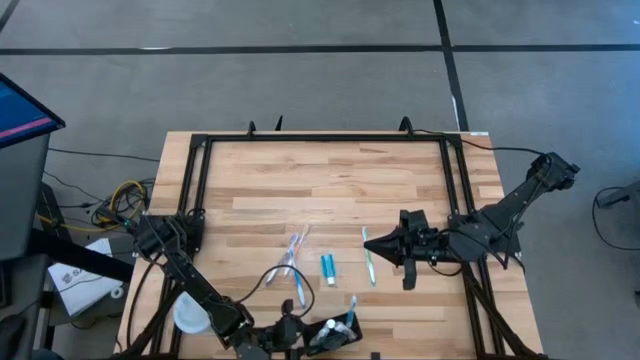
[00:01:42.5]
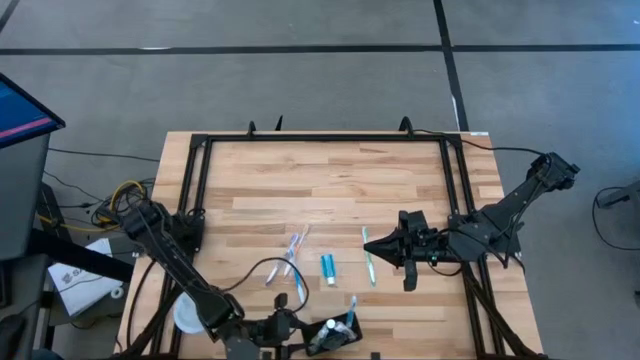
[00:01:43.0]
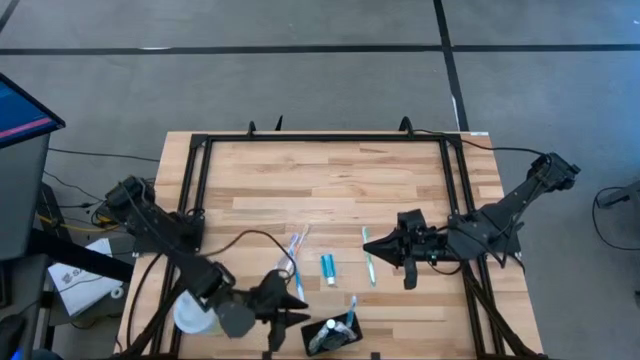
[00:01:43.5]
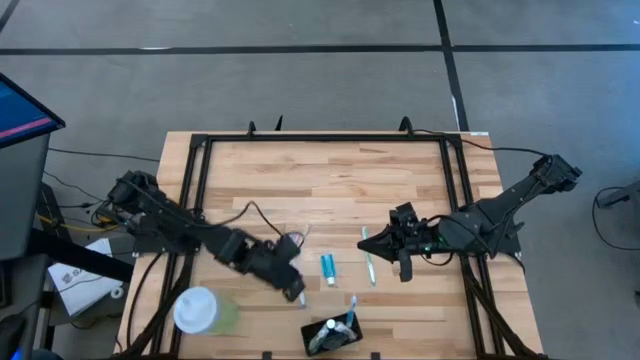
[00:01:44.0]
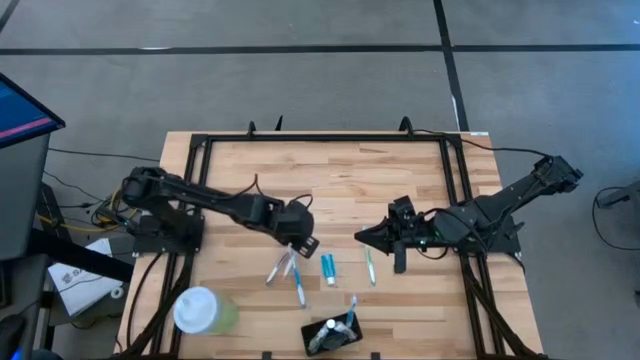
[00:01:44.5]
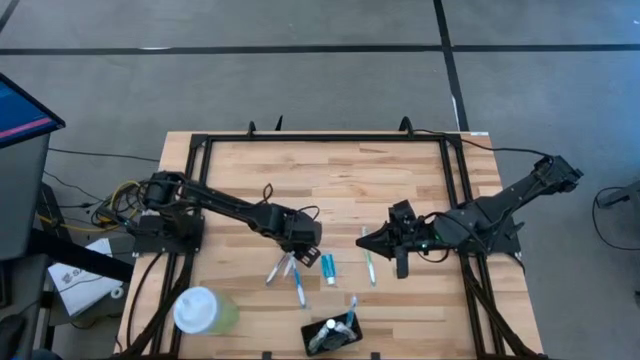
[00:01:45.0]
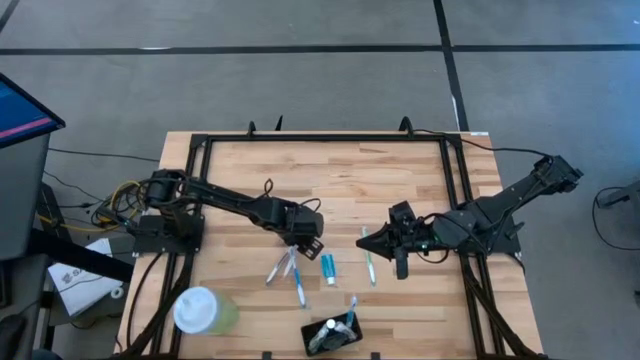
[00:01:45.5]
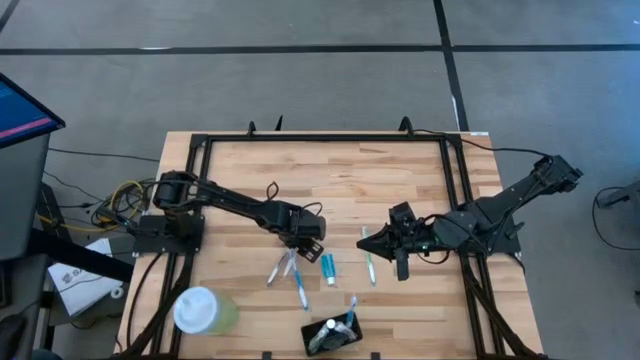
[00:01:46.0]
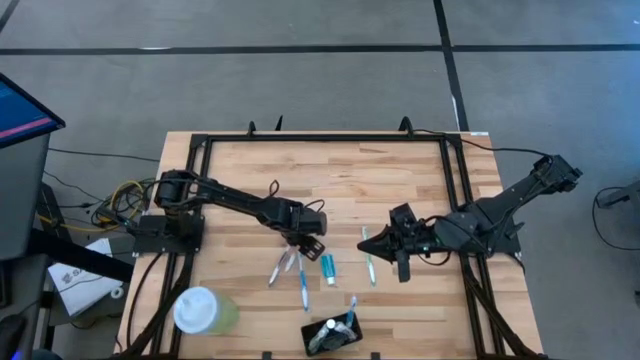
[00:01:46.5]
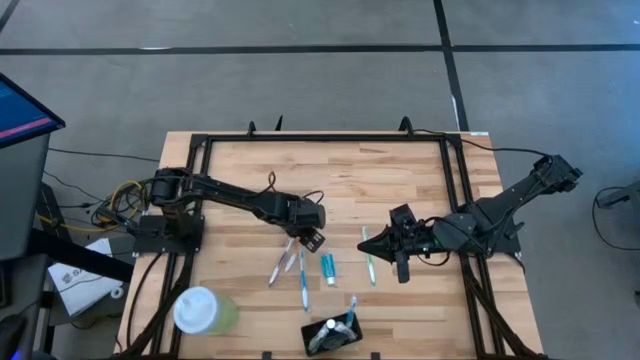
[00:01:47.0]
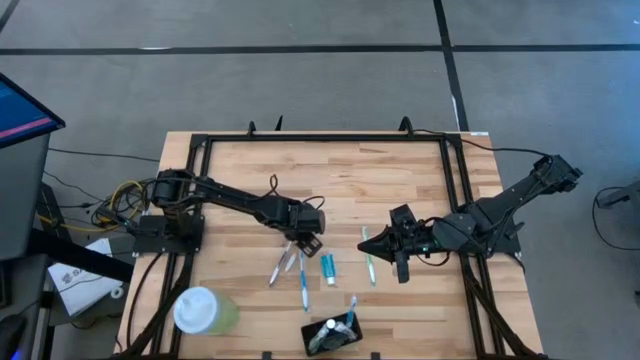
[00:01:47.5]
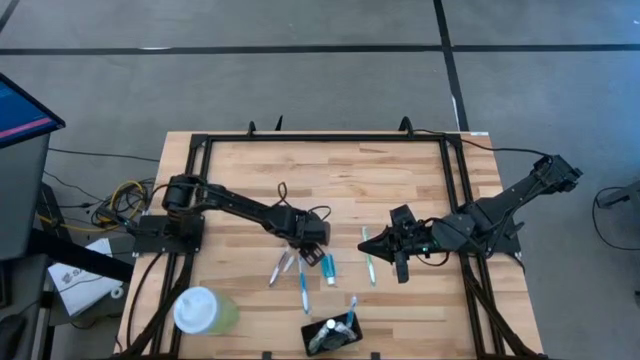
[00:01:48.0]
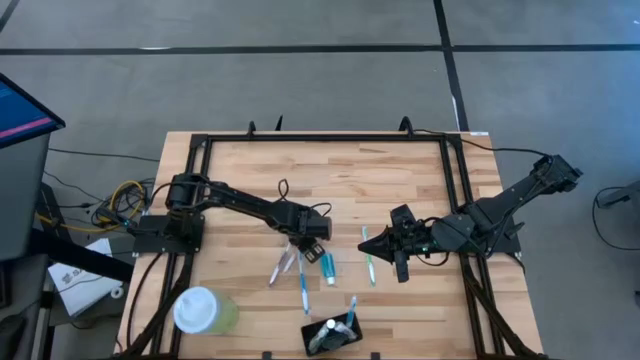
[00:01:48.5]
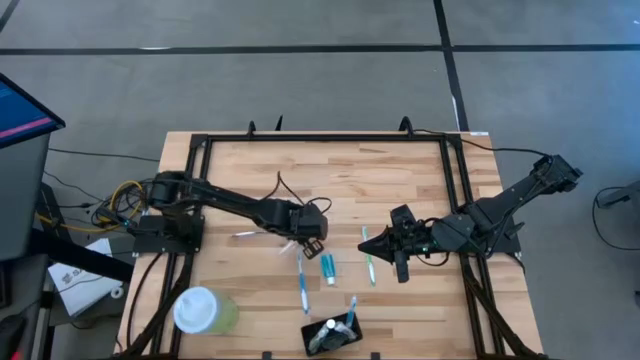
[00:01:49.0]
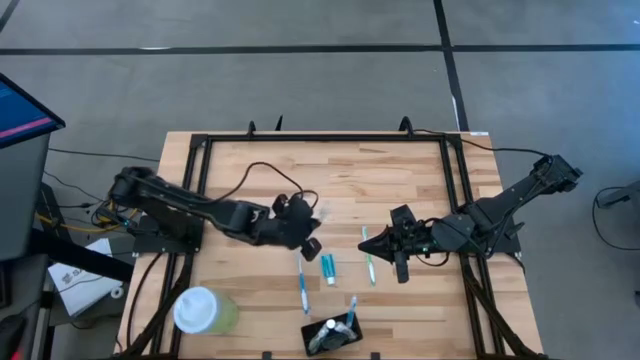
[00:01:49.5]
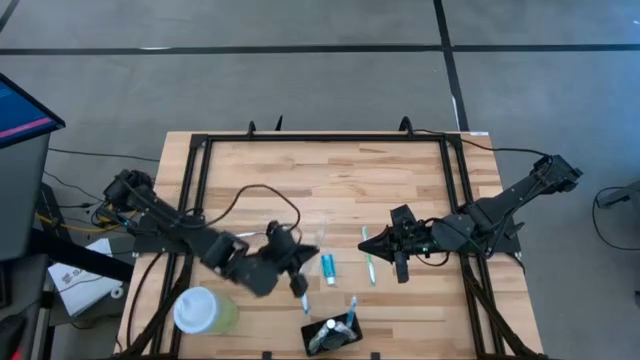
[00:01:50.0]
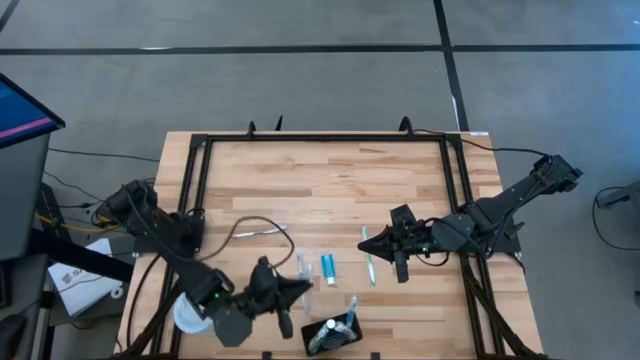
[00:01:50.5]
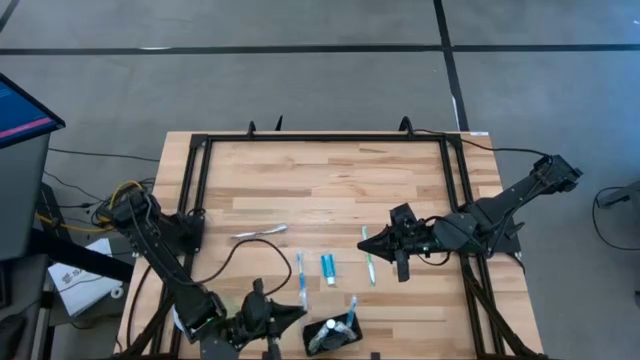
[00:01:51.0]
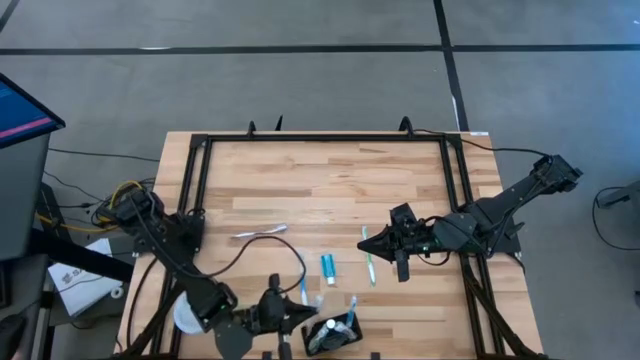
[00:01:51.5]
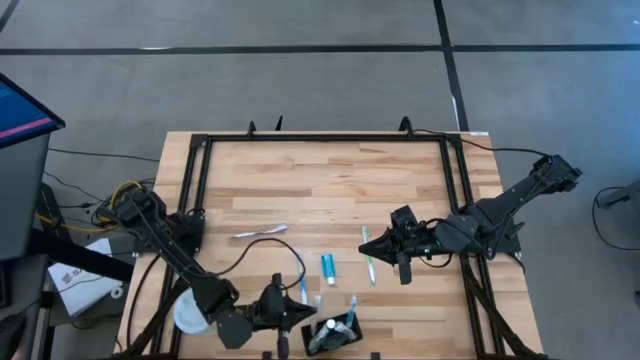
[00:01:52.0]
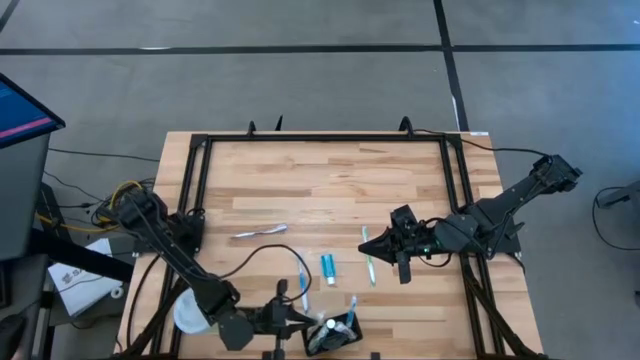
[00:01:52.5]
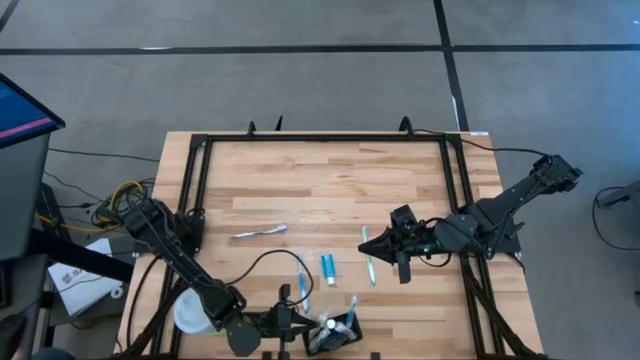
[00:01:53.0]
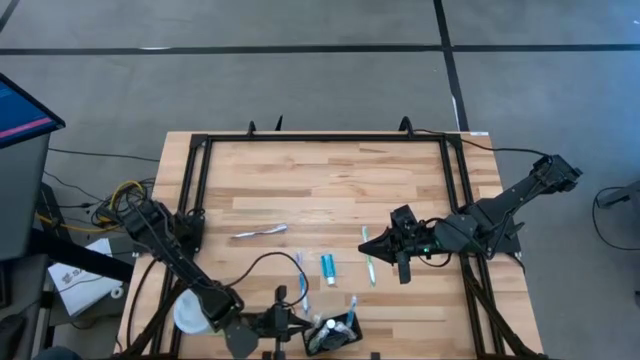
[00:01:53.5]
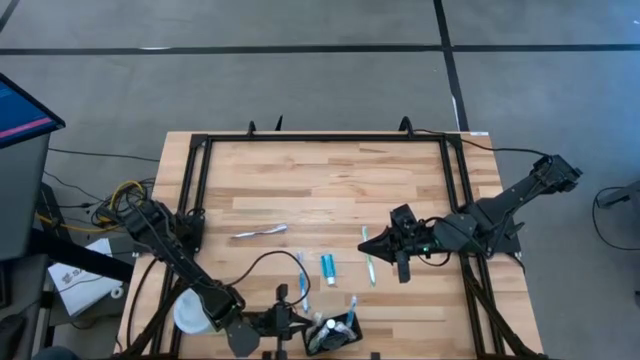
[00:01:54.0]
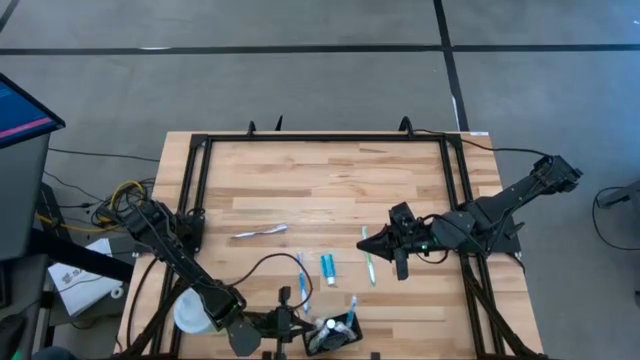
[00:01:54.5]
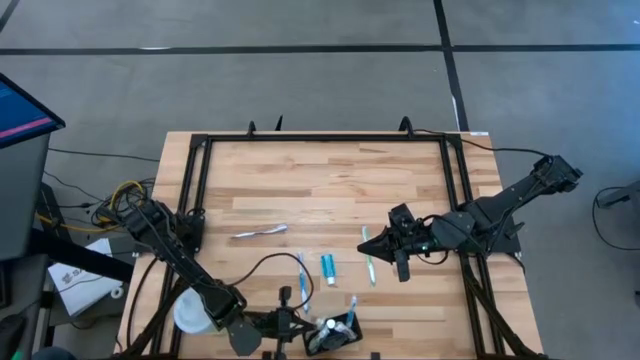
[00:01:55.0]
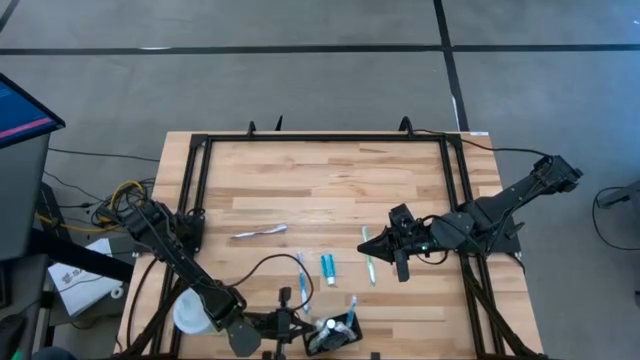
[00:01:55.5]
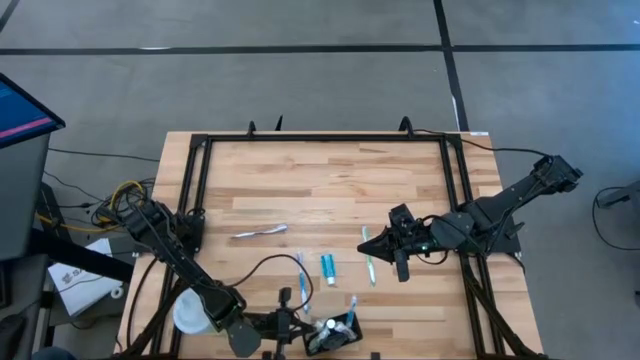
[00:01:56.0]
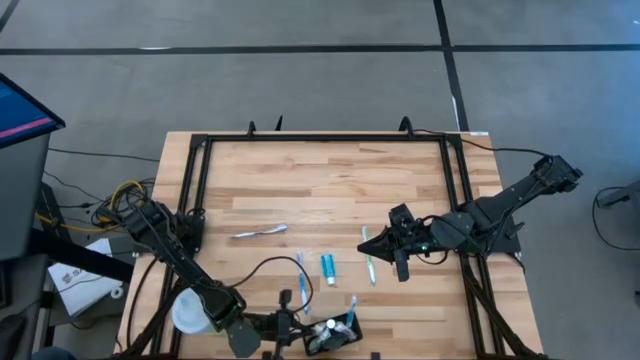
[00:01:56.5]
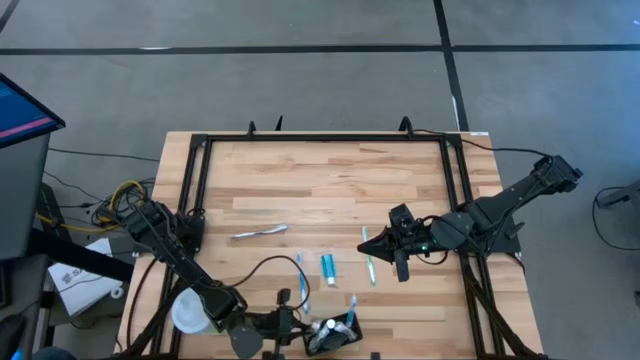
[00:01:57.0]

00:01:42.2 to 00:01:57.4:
Task: Pick & Place toothbrushing station
Put the orange toothbrush into the black wire organizer
